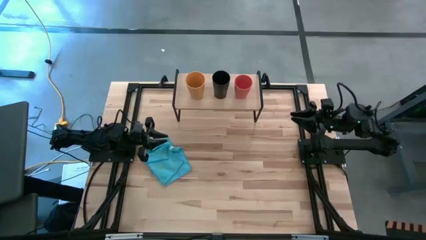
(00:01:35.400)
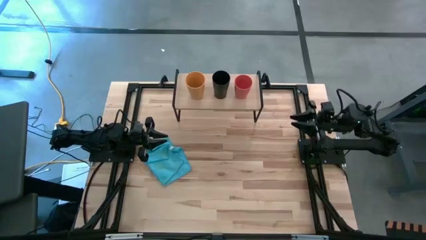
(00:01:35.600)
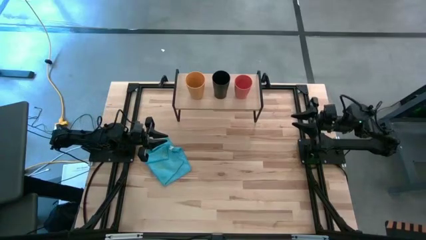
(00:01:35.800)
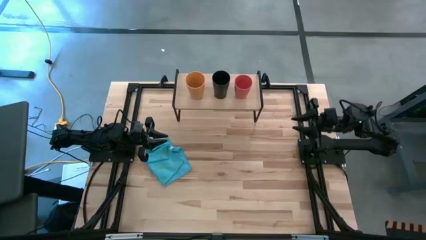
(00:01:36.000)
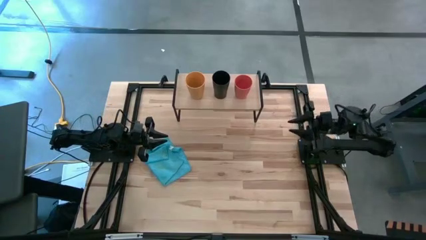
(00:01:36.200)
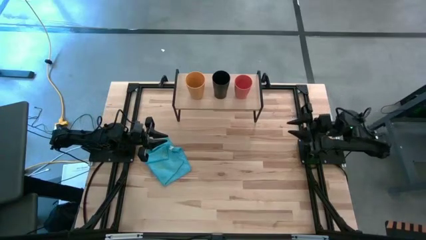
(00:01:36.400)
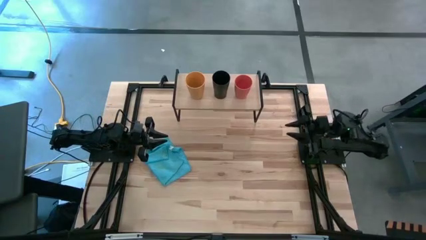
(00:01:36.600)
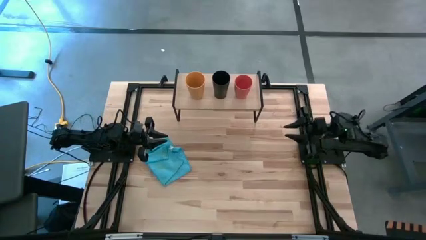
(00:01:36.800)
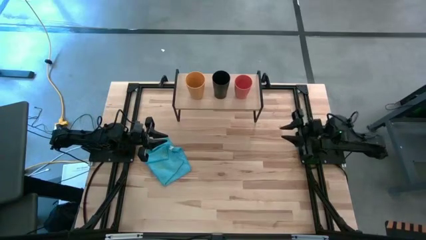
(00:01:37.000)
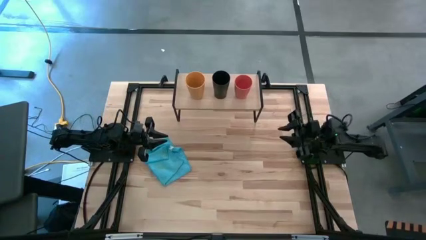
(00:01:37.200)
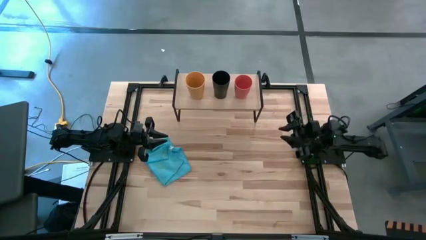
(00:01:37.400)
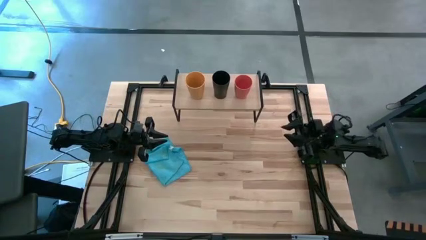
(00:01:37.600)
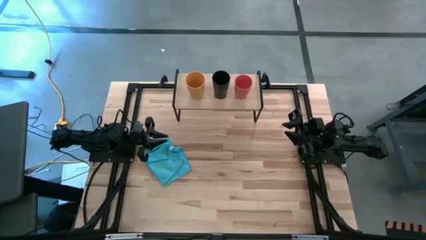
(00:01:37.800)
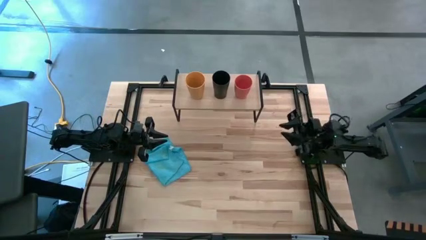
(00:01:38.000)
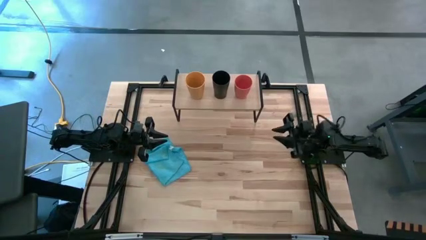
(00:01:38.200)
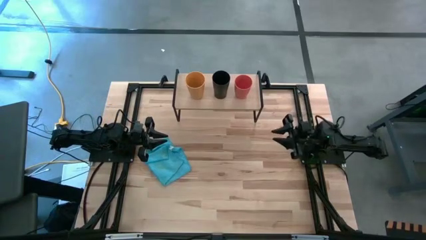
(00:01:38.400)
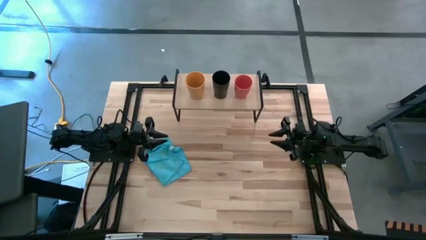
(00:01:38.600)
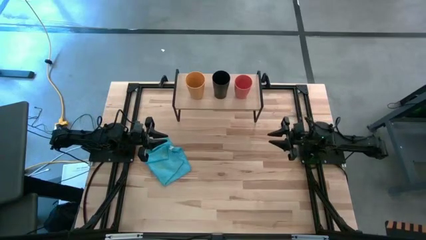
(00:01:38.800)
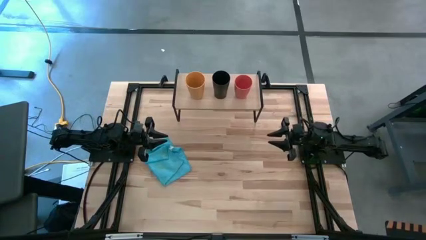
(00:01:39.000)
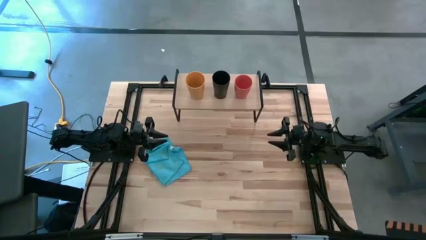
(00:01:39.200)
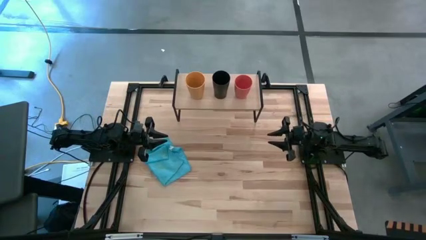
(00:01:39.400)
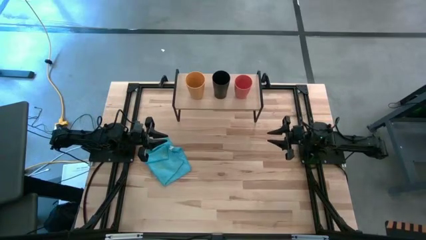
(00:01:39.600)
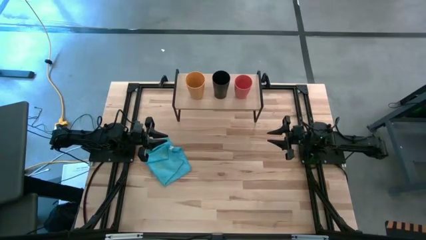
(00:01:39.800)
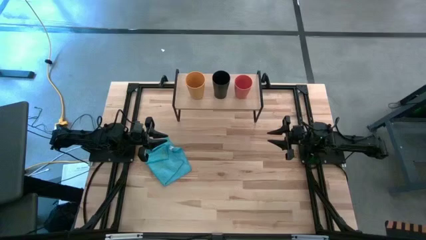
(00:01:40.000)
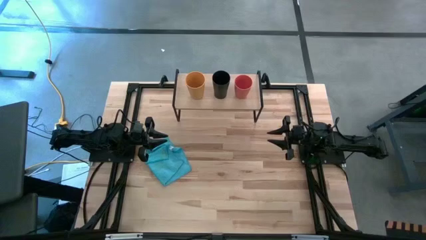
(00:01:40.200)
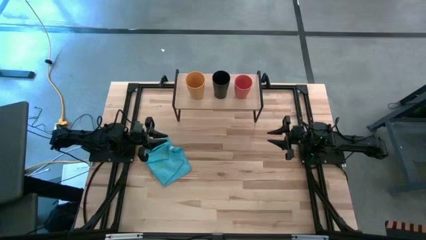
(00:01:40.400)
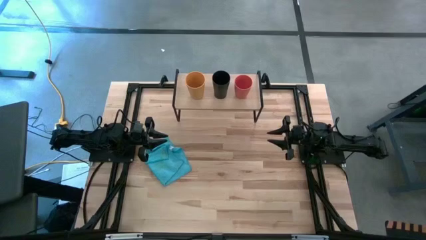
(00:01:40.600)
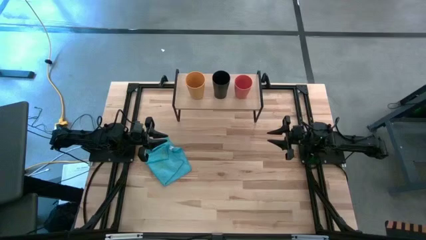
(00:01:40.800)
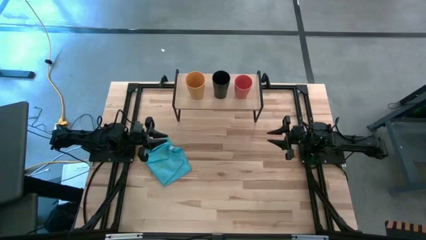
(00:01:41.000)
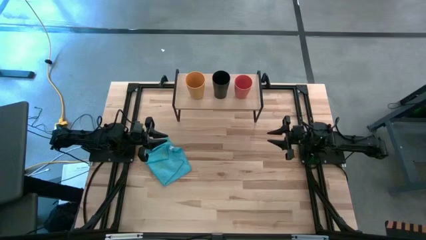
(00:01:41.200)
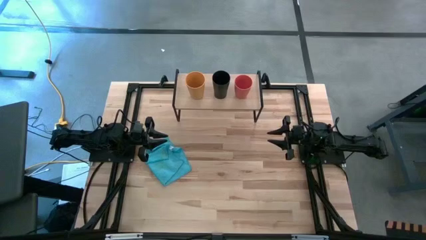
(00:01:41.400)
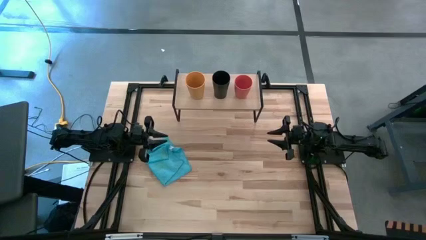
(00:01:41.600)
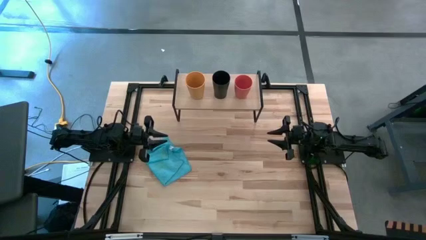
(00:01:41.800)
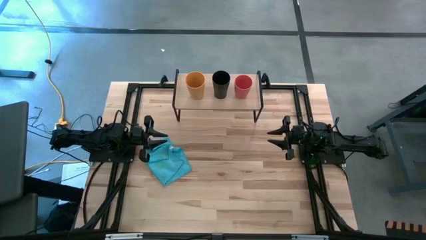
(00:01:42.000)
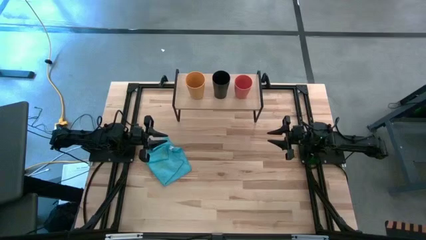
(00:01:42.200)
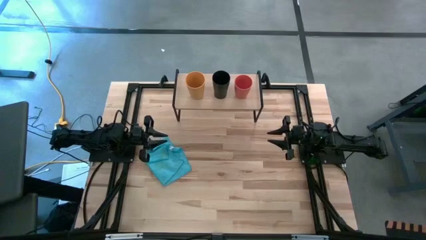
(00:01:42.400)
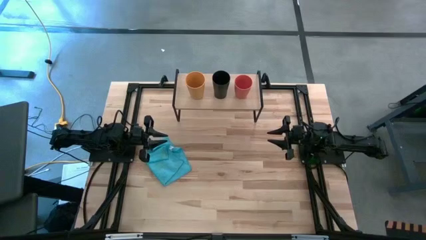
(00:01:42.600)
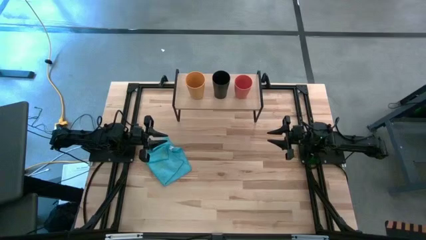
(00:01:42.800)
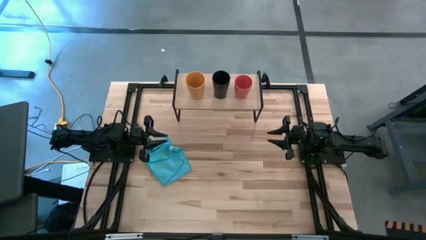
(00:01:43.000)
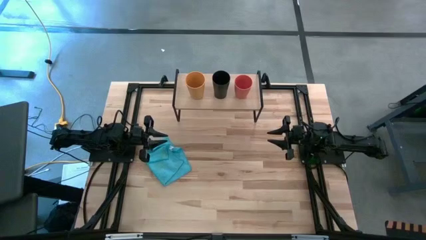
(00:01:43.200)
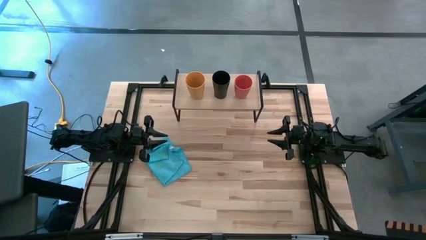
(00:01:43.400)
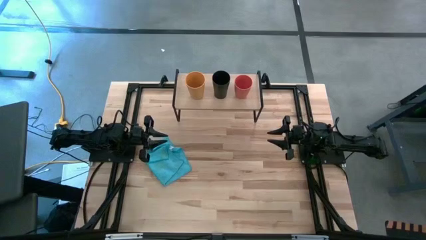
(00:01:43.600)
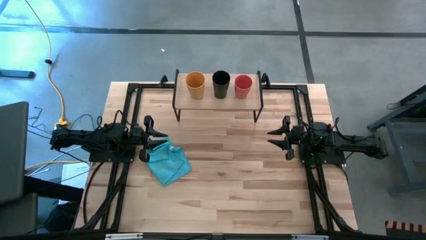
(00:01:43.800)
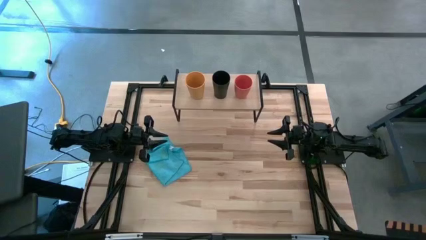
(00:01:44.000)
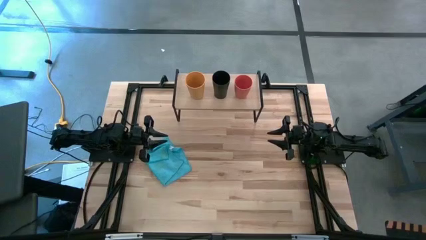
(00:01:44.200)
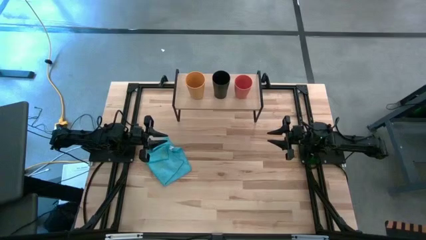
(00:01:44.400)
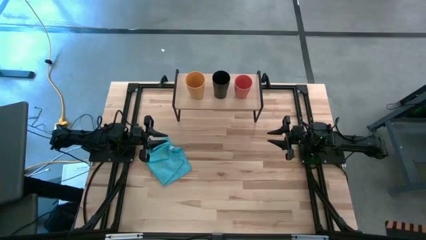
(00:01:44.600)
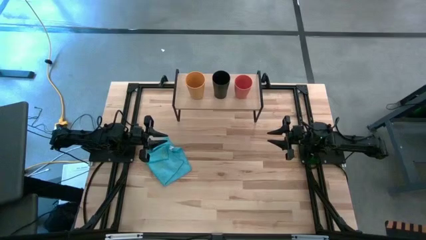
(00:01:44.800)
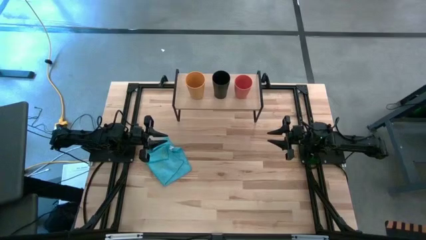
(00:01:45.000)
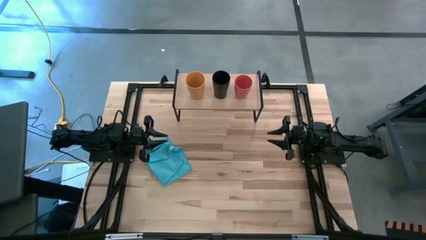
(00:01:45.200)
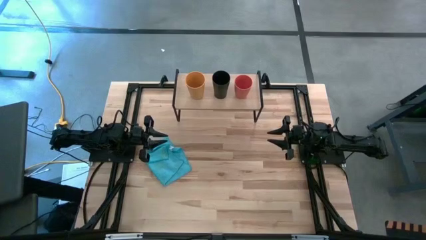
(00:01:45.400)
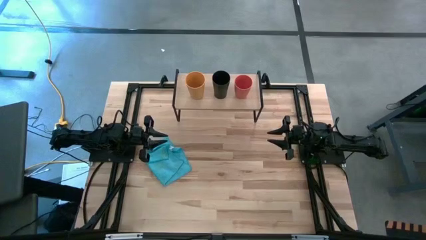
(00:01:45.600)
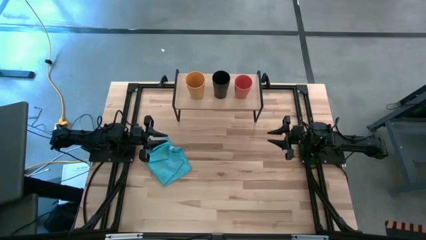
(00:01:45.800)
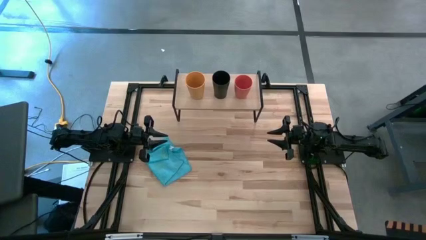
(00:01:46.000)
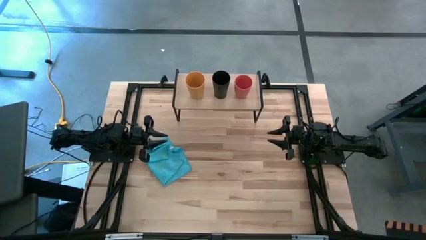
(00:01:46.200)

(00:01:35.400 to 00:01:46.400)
Task: Stack small to large cups/mugs on shelf
Return to Home Position

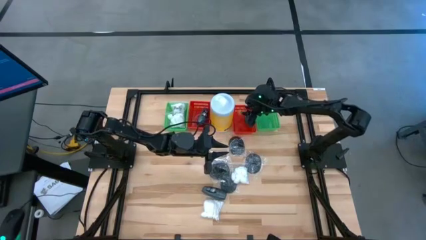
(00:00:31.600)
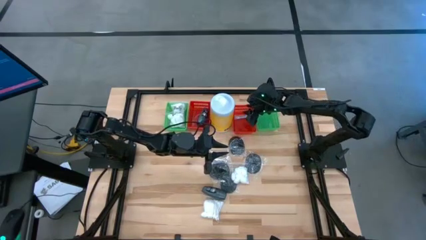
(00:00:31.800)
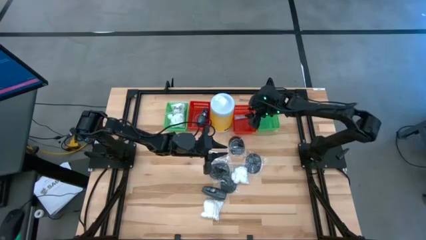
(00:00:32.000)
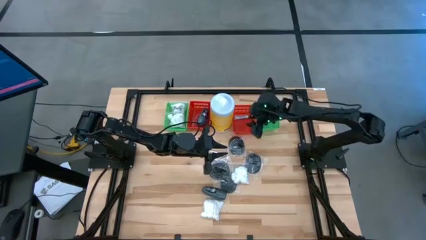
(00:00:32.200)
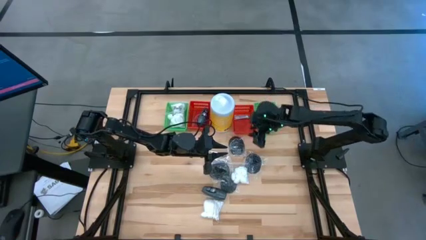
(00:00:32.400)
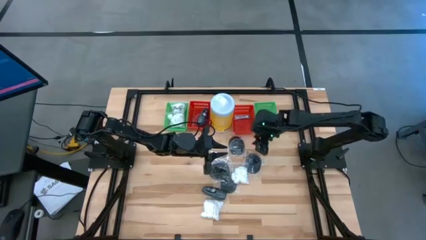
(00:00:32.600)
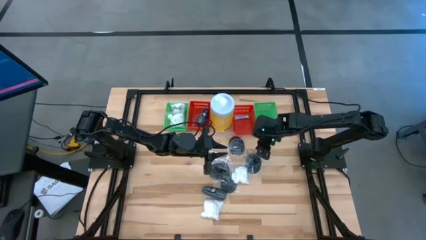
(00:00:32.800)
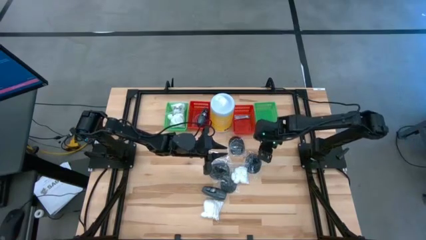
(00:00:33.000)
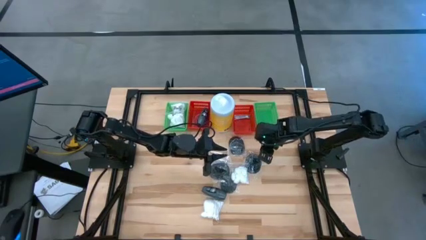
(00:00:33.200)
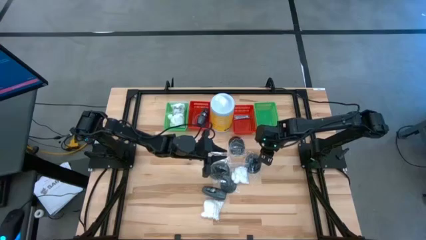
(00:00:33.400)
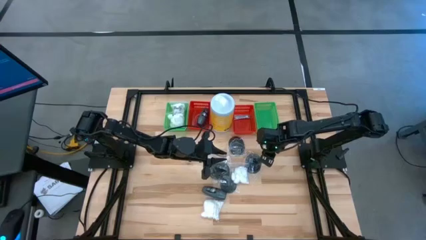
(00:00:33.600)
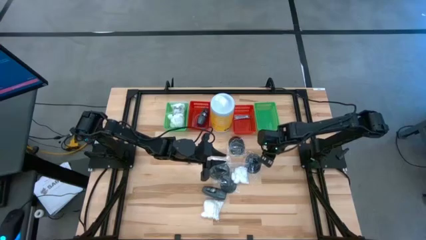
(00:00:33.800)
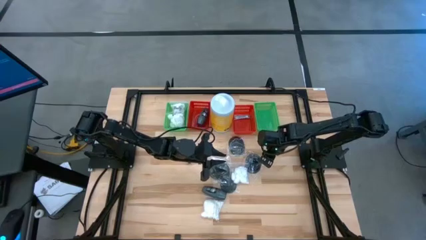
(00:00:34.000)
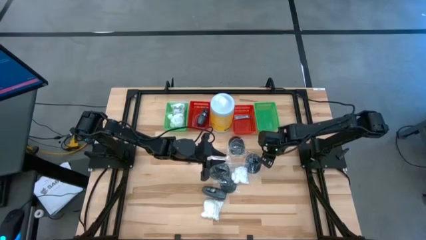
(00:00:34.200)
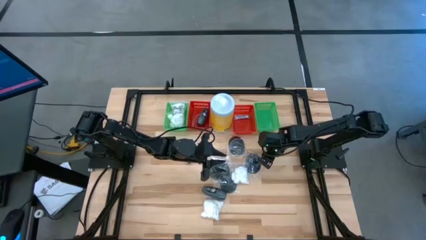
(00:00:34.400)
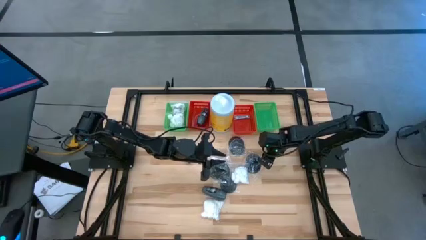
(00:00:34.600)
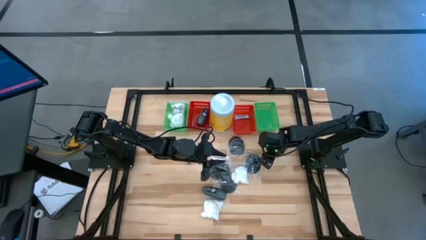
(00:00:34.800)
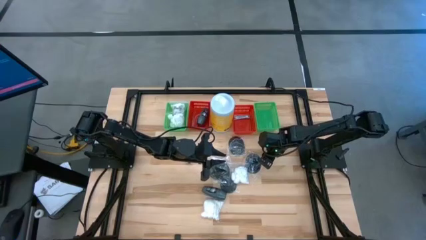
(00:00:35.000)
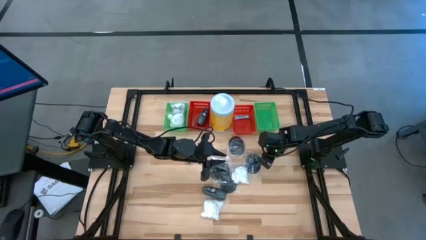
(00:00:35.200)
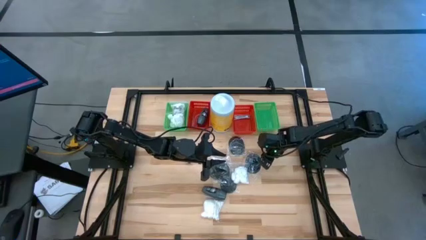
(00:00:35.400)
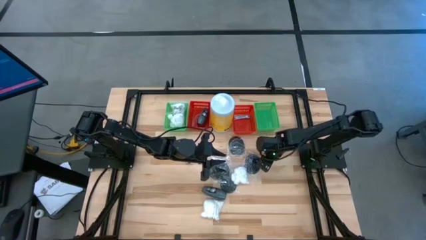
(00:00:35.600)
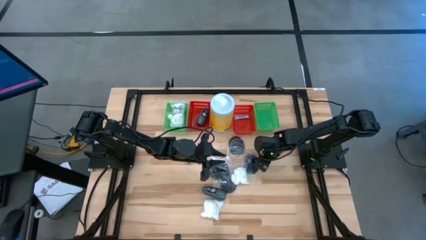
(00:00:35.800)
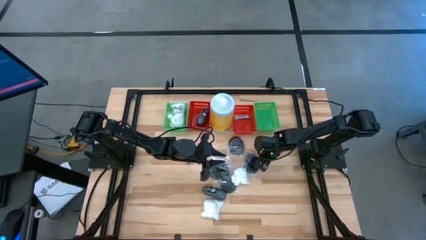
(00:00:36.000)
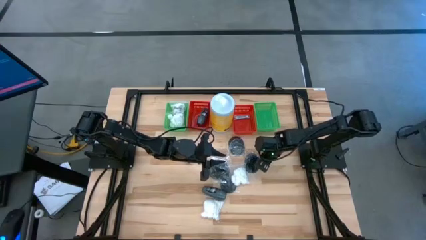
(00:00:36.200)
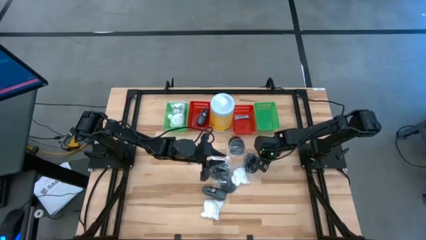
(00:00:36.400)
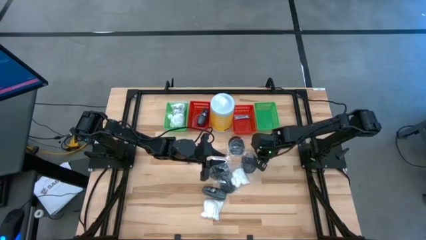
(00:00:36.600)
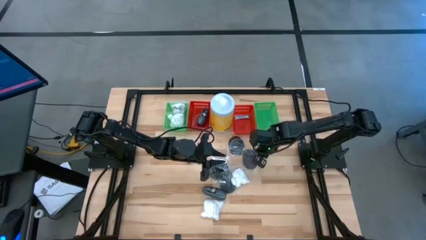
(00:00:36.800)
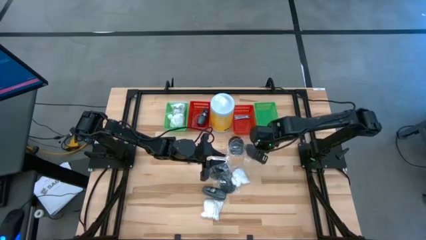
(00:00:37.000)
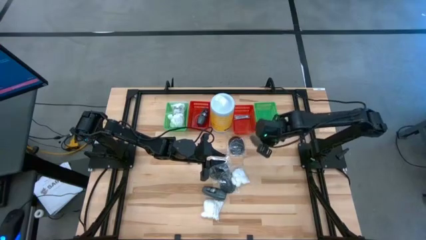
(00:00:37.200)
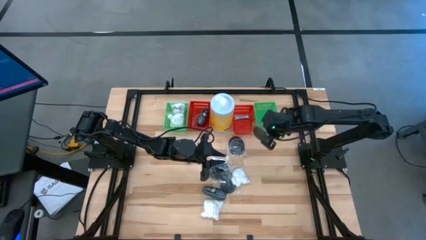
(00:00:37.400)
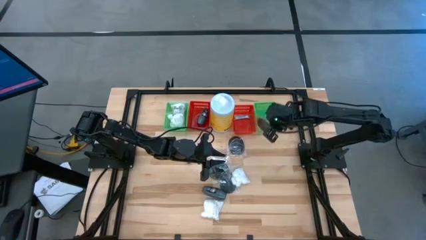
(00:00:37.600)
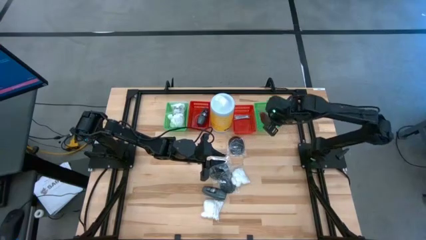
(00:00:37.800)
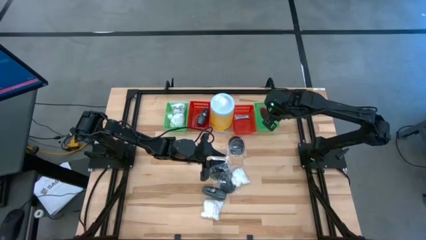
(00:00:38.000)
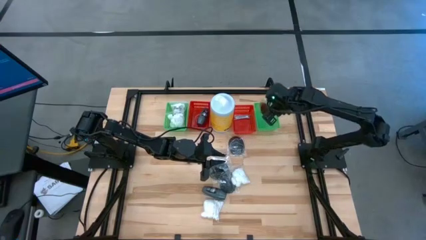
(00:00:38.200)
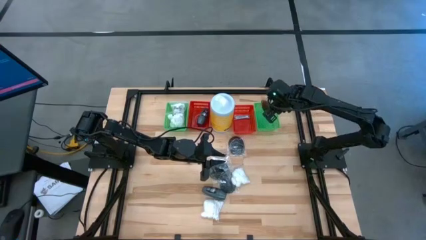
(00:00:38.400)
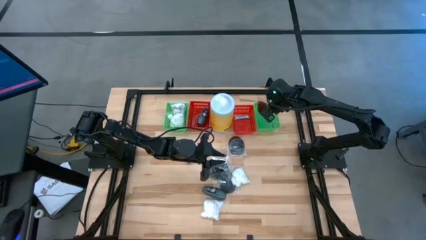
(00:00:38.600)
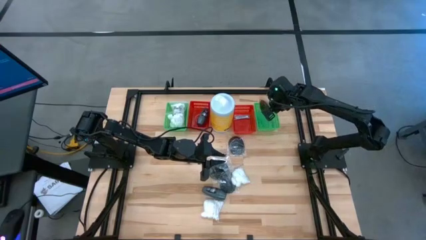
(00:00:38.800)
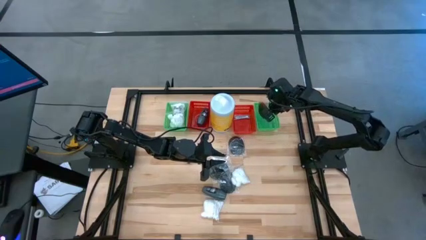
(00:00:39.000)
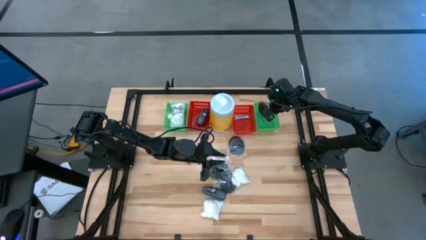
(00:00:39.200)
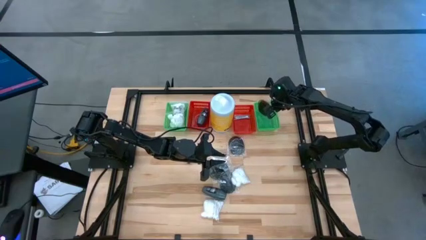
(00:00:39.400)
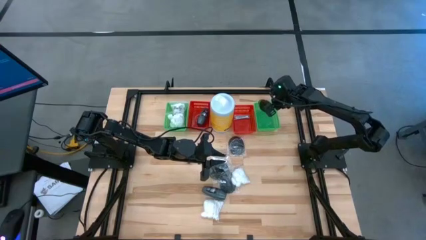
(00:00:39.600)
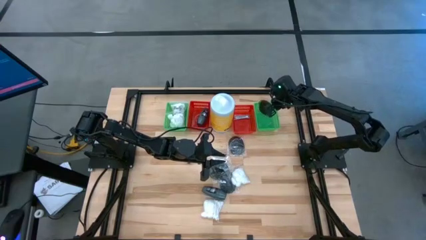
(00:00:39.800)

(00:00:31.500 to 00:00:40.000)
Task: Pick & Place Travel size toiletries
Put the black hairbrush into the right green bin
